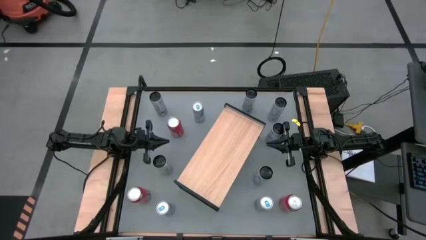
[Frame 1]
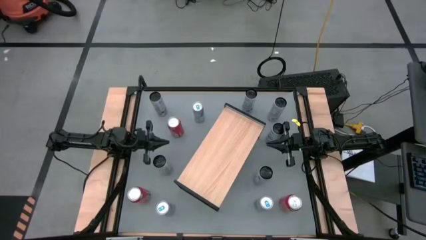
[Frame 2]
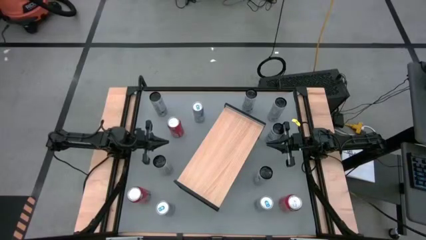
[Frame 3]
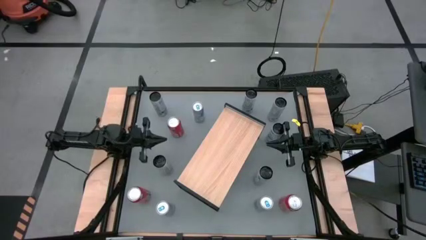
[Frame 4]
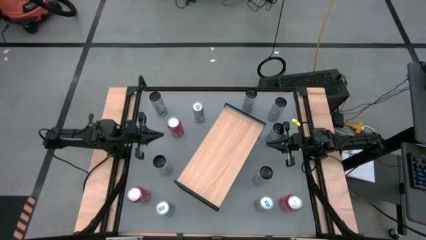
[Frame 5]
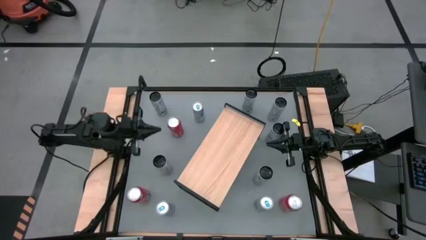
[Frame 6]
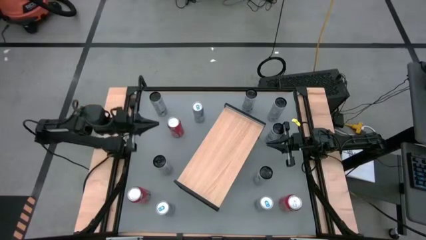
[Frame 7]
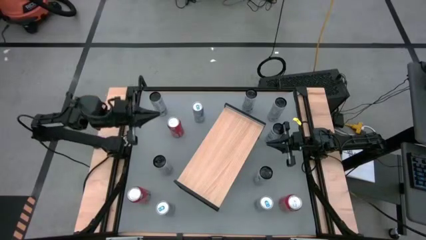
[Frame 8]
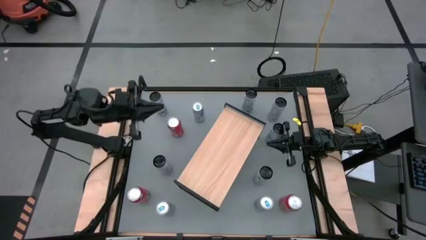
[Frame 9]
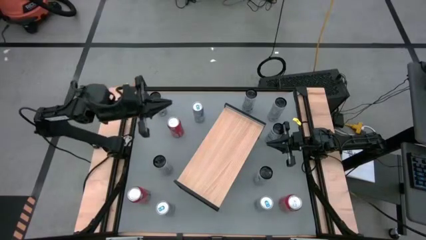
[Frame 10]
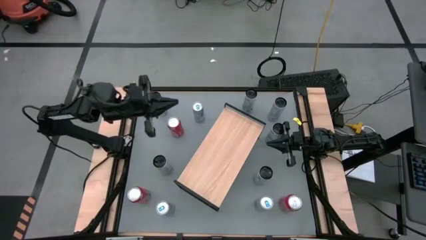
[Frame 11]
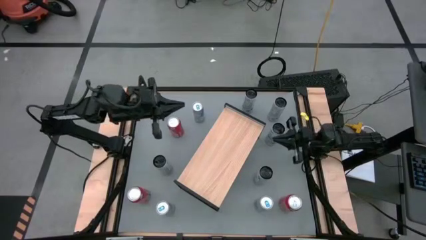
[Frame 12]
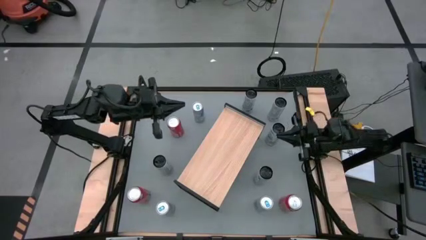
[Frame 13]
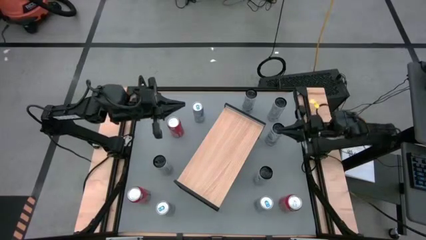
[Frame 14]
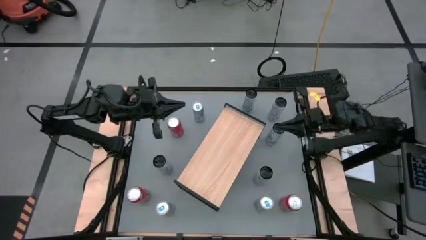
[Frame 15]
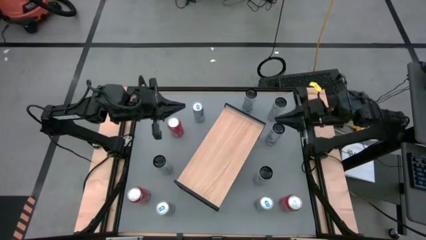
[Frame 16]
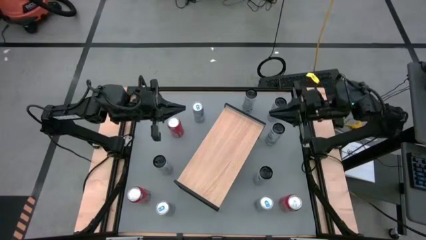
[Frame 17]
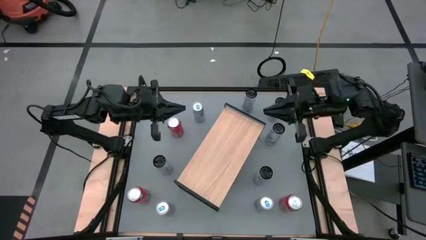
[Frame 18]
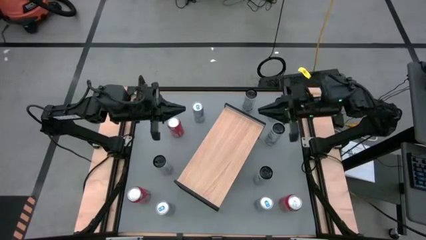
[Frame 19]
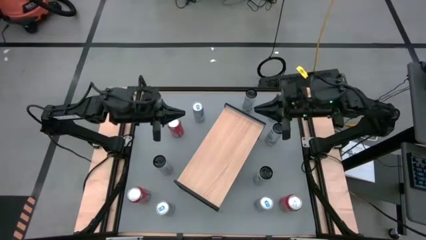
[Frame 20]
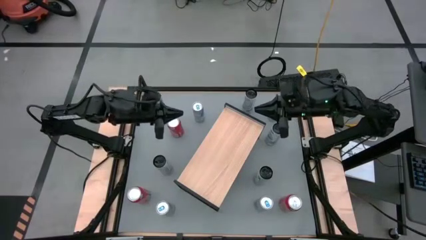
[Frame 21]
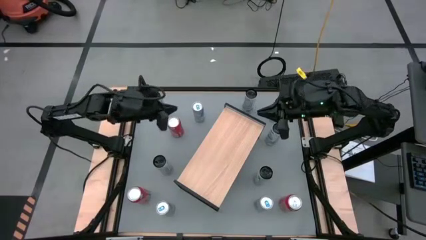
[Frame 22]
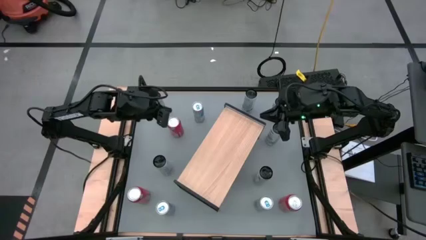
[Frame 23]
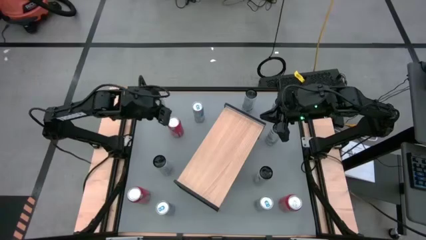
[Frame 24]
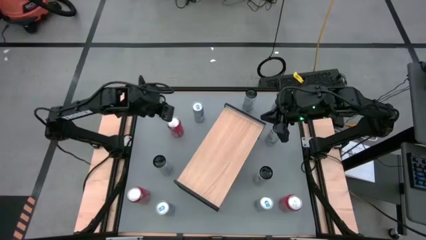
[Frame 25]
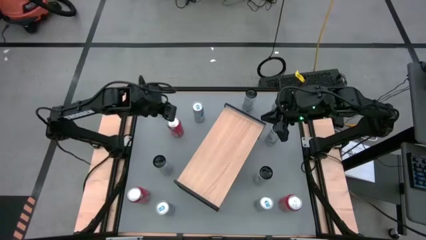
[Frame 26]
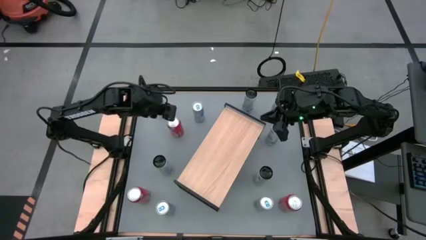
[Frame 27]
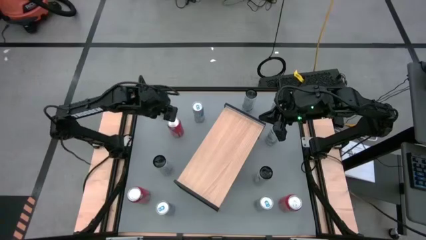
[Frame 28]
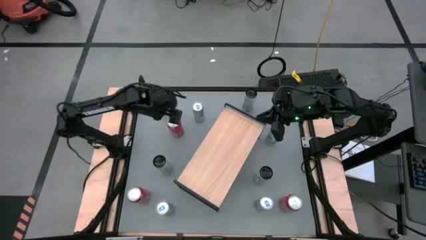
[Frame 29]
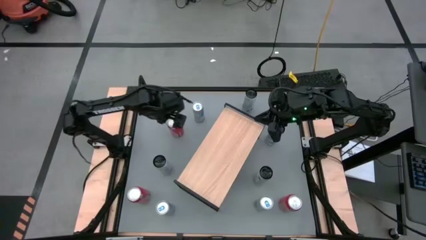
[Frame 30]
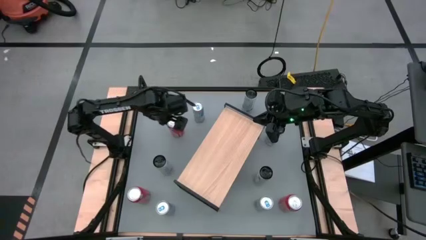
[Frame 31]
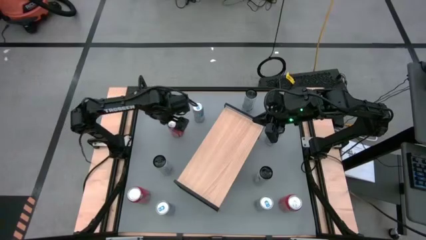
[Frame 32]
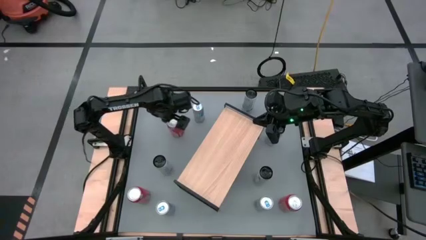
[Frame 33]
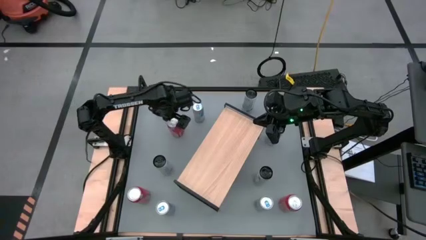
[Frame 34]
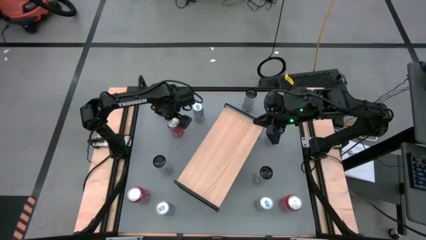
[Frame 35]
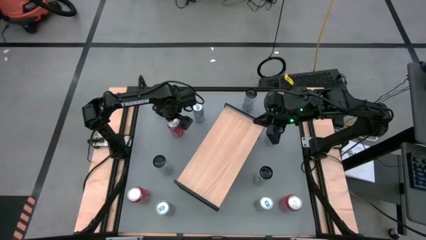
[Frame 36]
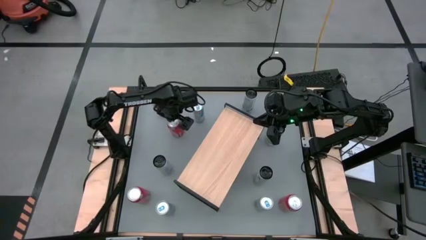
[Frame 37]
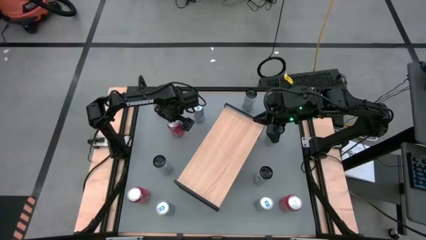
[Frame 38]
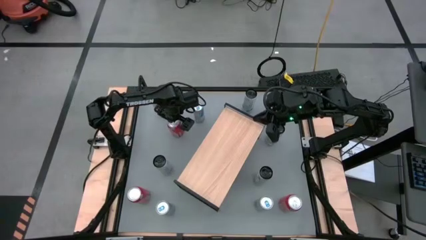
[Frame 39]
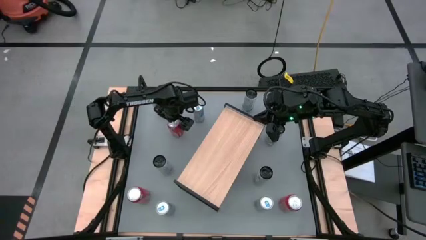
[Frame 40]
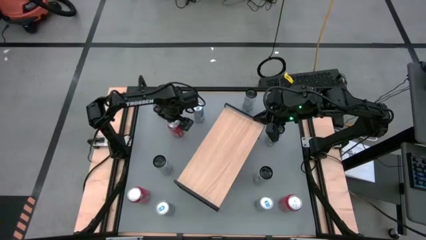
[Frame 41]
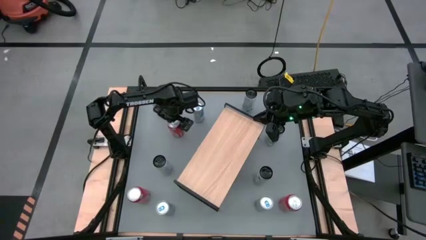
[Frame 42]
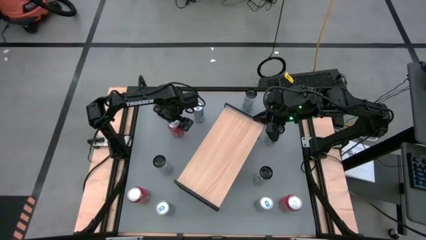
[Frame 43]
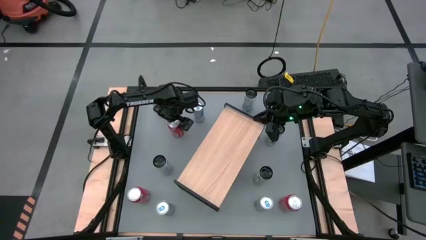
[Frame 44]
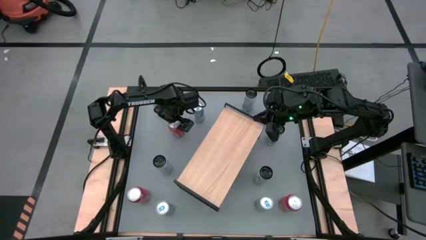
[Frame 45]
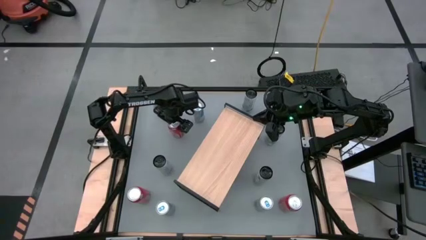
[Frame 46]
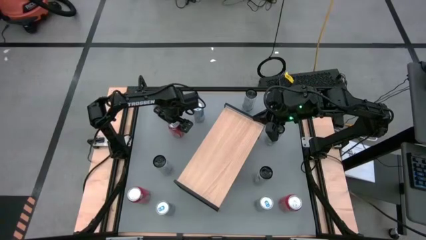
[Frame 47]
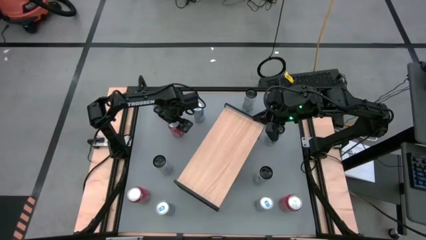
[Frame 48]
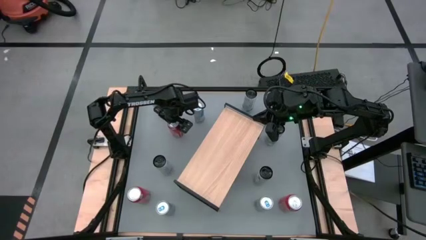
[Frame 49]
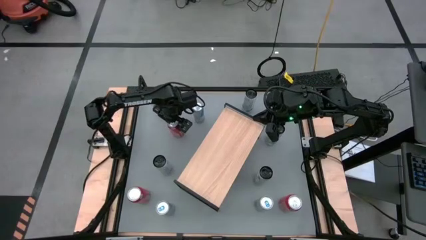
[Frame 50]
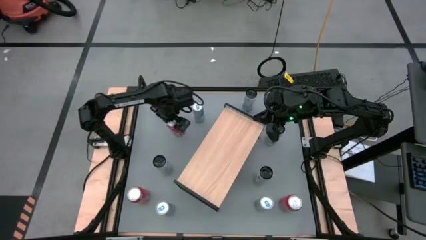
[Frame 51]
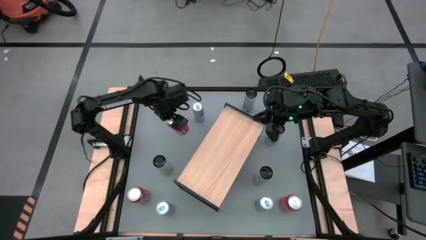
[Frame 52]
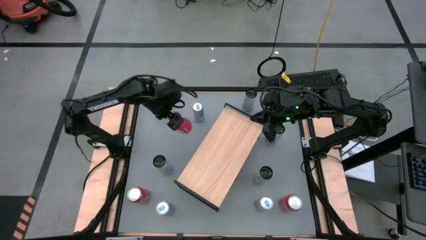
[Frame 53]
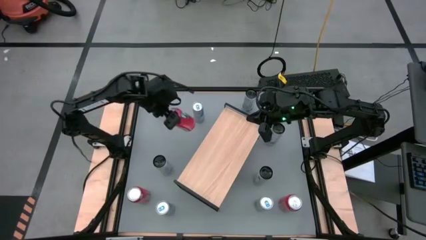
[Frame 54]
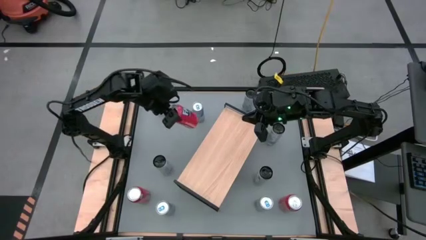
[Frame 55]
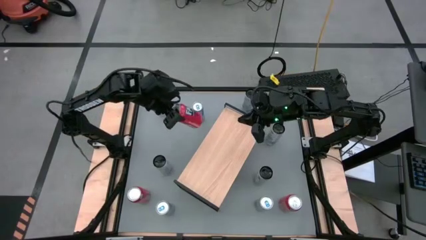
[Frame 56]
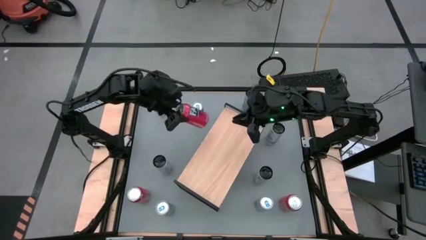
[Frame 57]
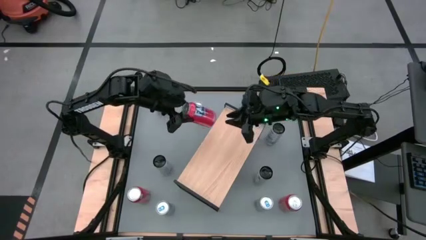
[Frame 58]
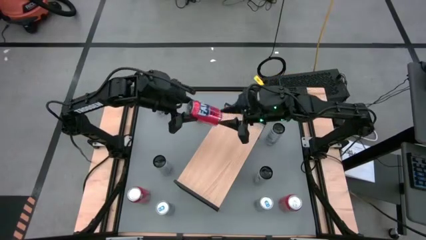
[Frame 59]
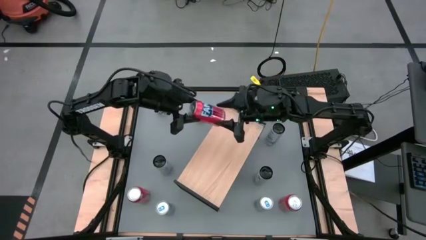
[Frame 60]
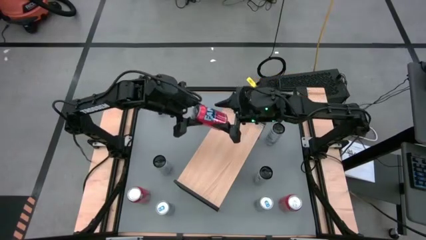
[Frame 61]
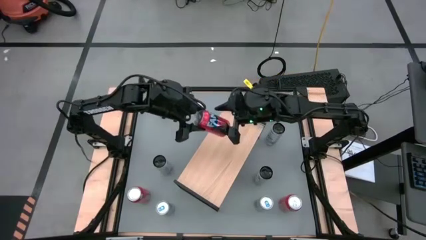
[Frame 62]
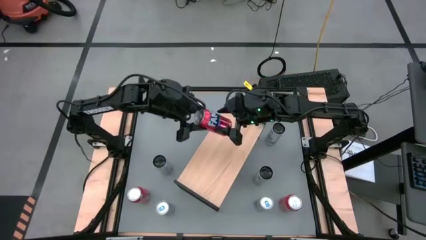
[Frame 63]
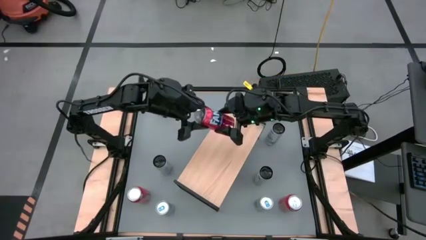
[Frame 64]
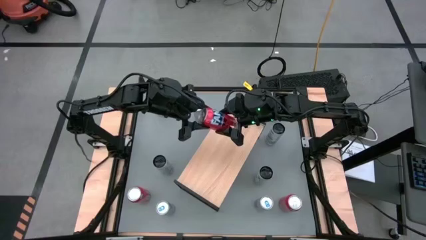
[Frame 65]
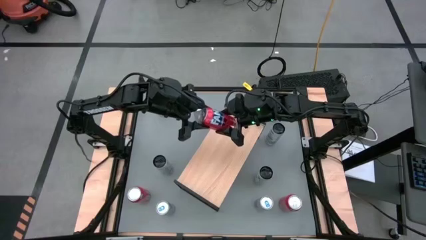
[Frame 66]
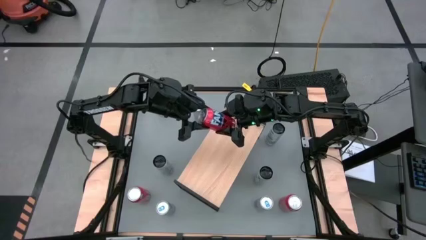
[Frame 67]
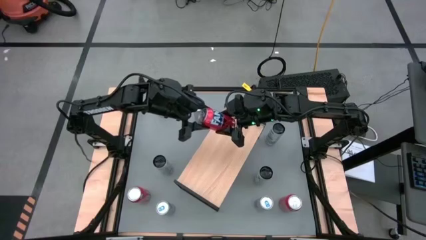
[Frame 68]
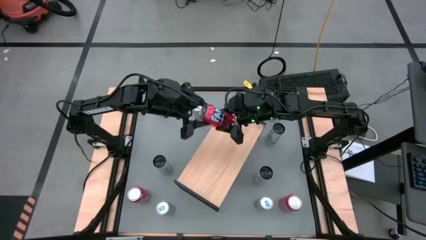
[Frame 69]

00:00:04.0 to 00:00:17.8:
Task: Place canned beverage on shelf
Put the red soda can on the shelf
